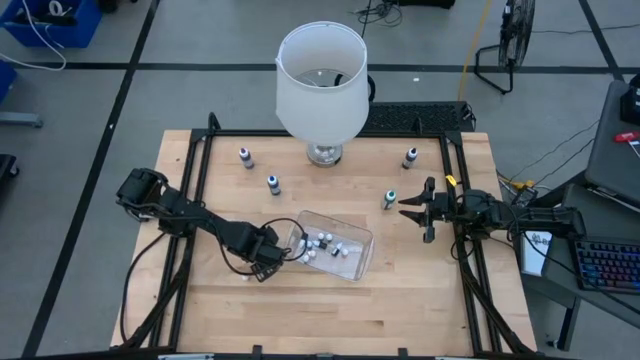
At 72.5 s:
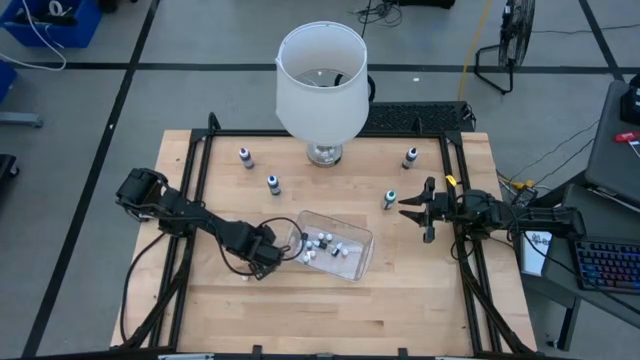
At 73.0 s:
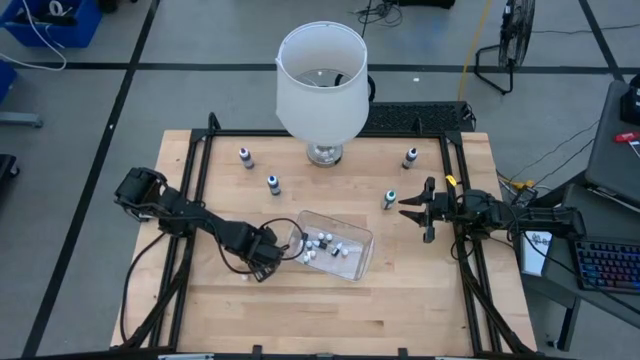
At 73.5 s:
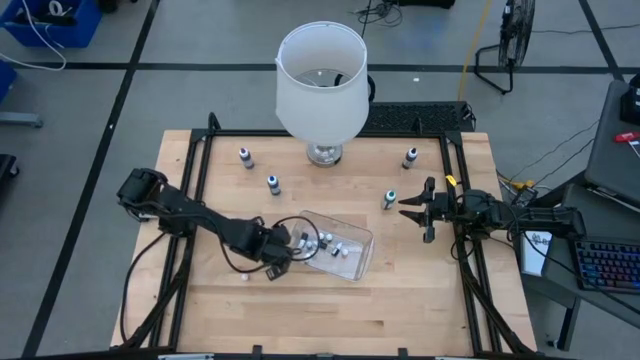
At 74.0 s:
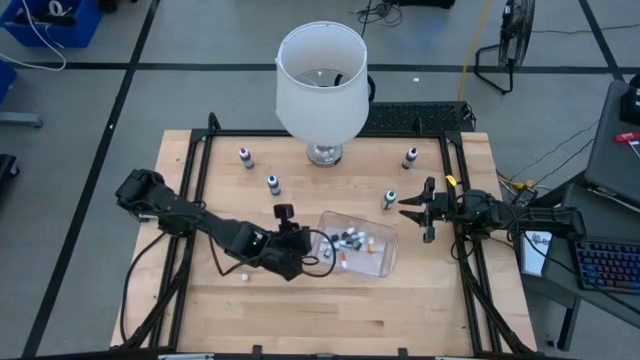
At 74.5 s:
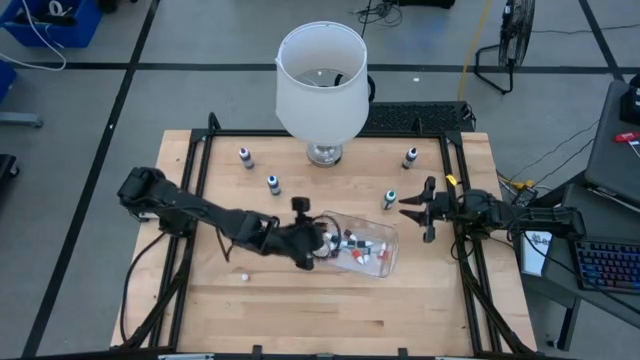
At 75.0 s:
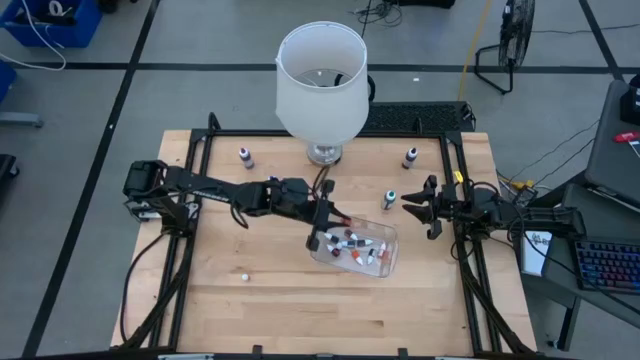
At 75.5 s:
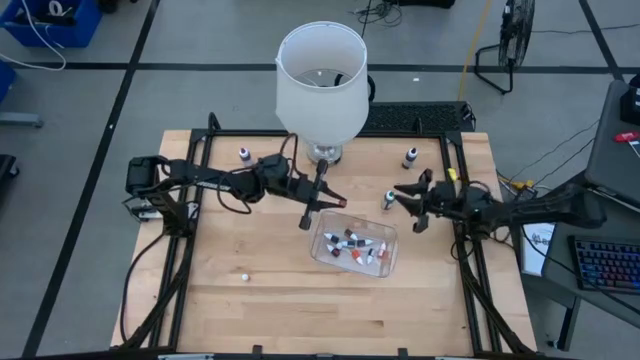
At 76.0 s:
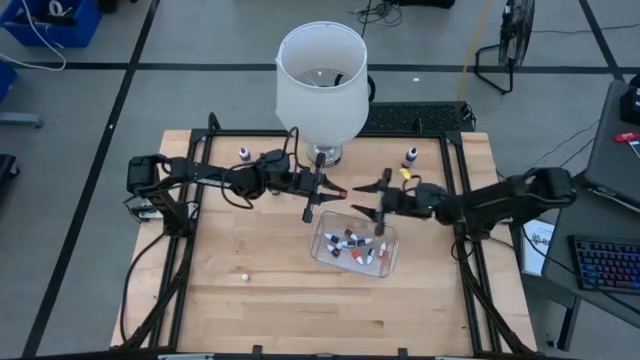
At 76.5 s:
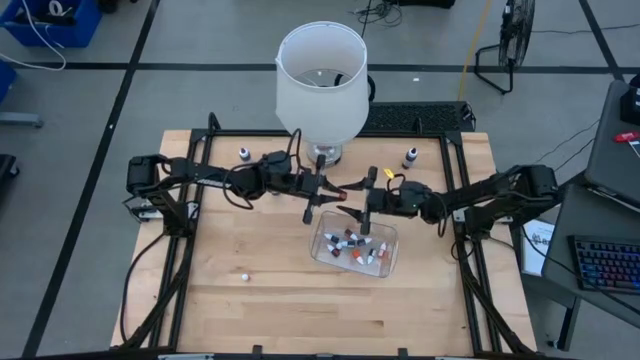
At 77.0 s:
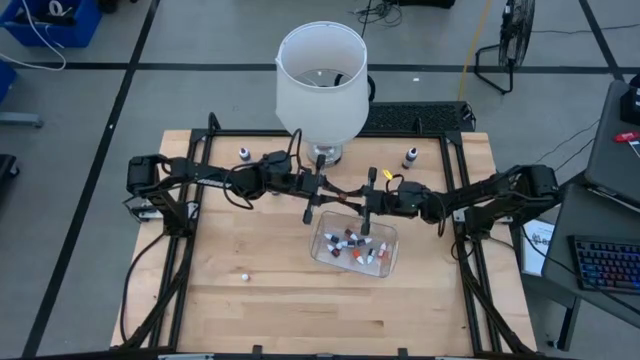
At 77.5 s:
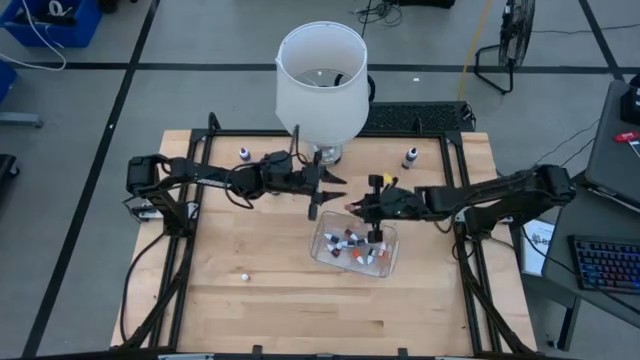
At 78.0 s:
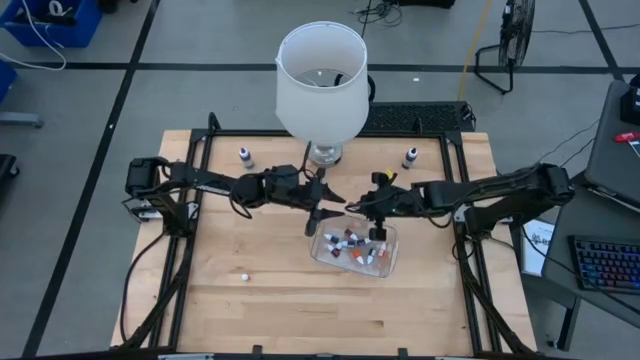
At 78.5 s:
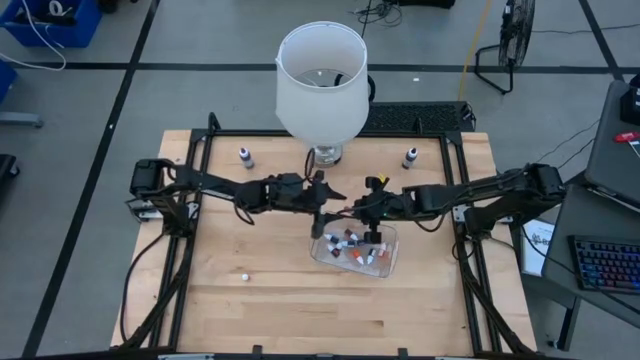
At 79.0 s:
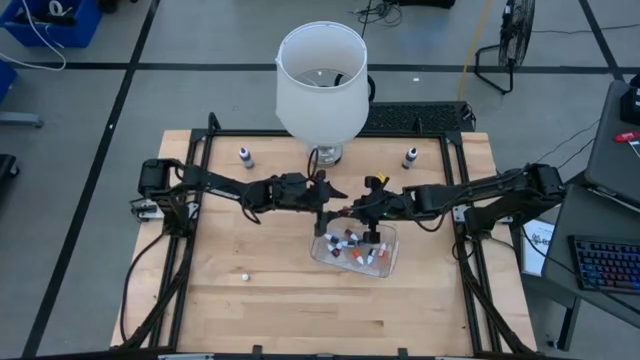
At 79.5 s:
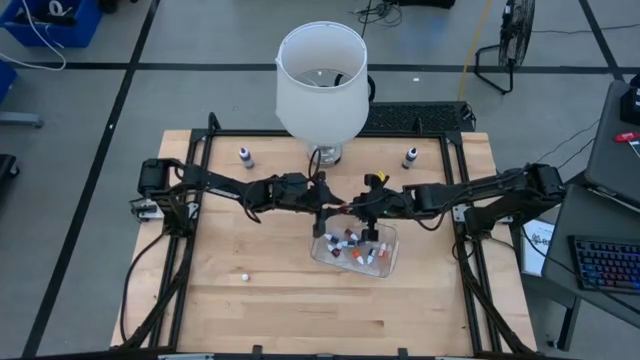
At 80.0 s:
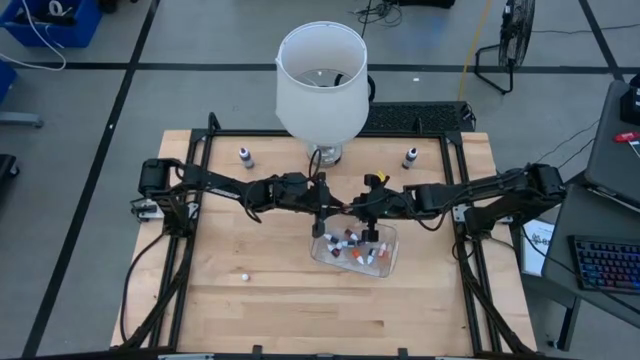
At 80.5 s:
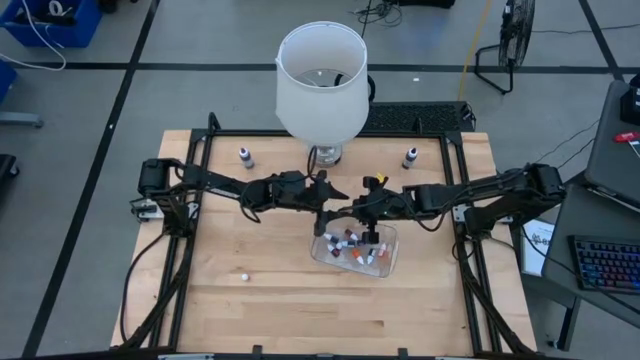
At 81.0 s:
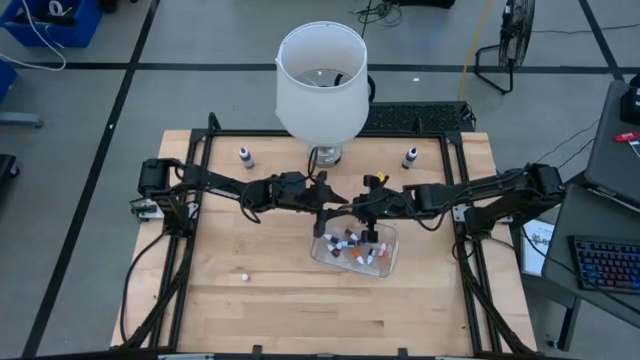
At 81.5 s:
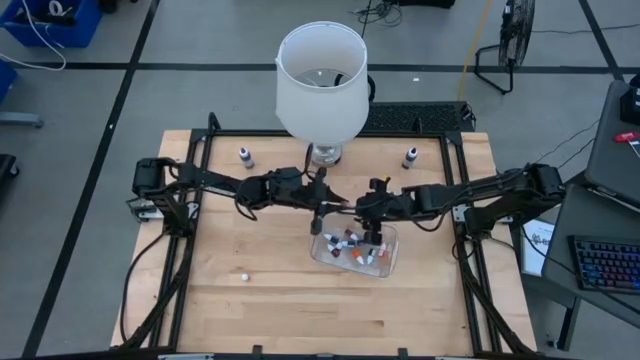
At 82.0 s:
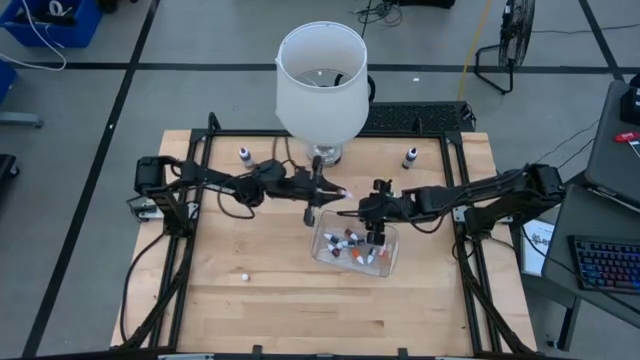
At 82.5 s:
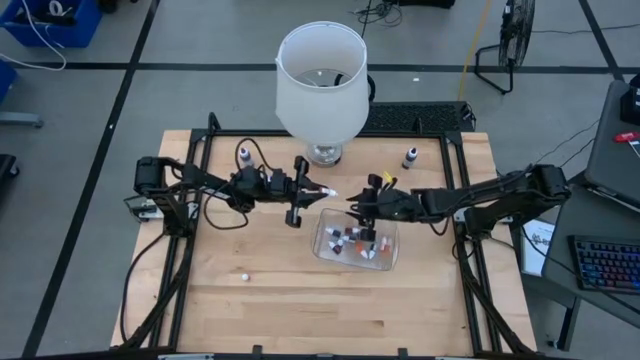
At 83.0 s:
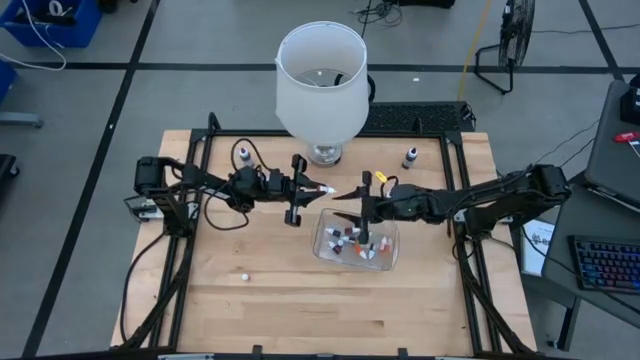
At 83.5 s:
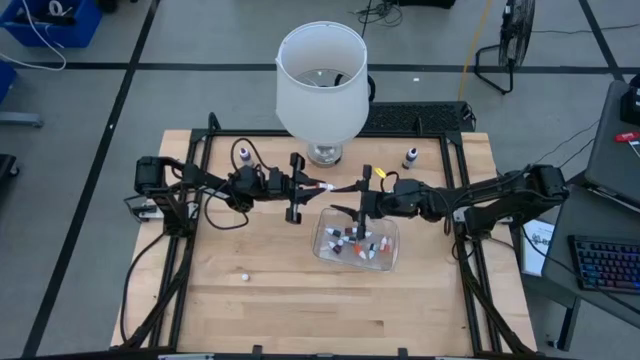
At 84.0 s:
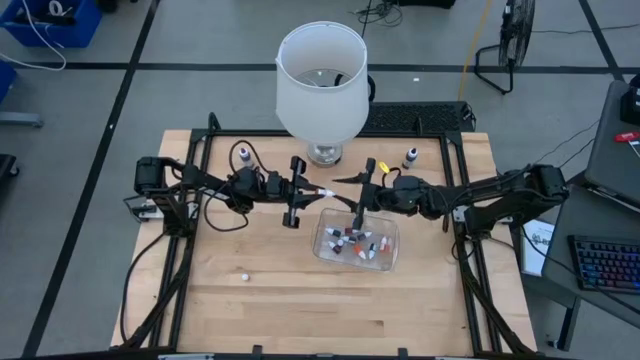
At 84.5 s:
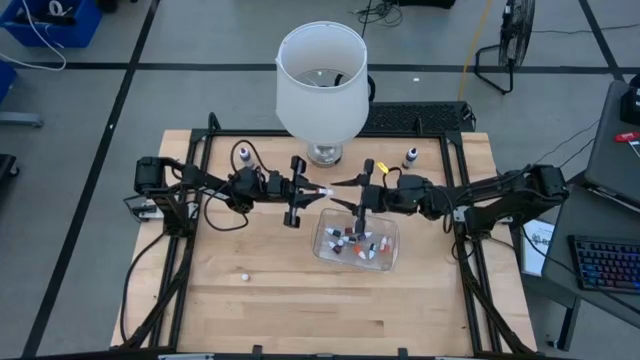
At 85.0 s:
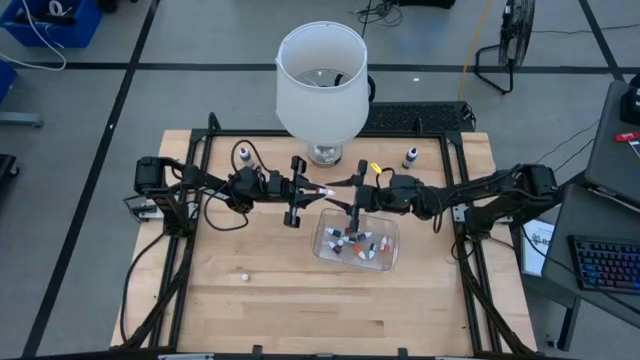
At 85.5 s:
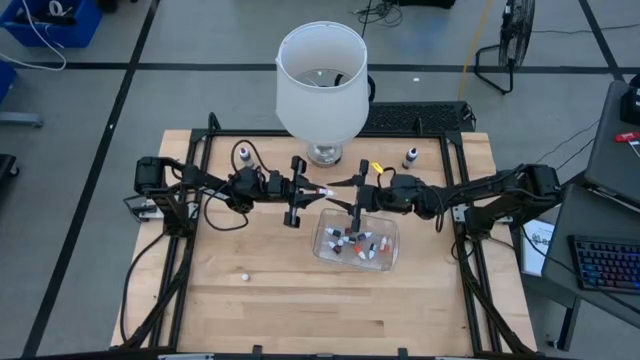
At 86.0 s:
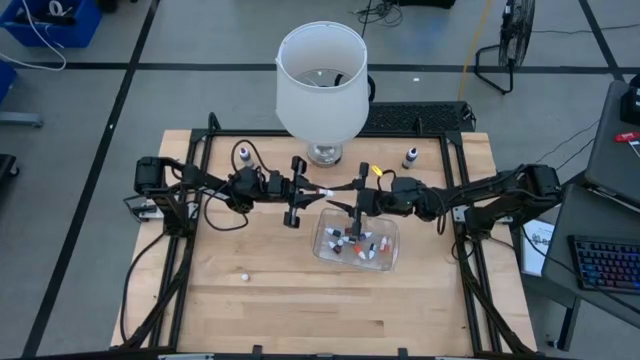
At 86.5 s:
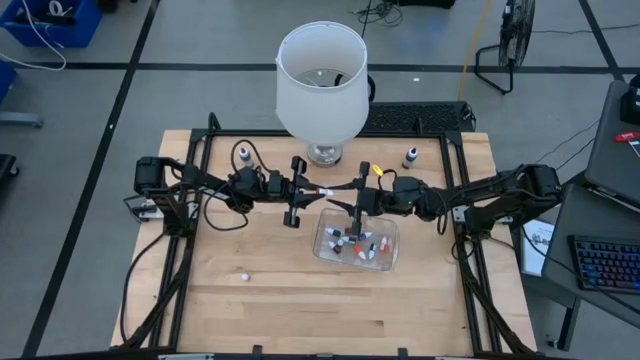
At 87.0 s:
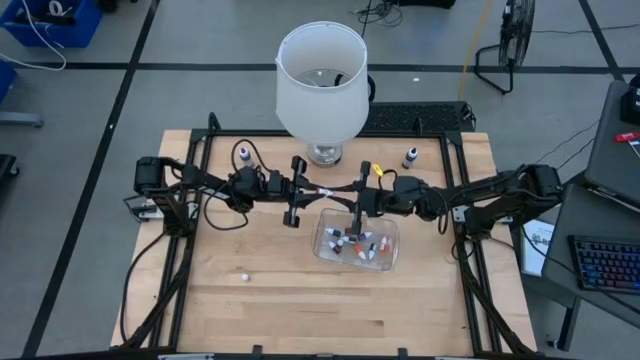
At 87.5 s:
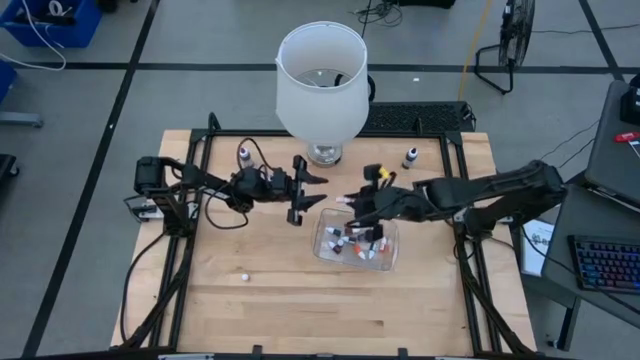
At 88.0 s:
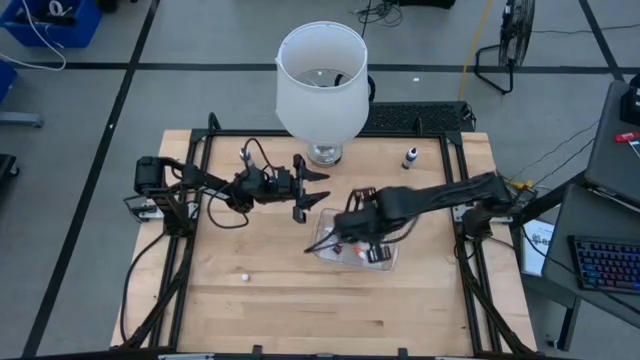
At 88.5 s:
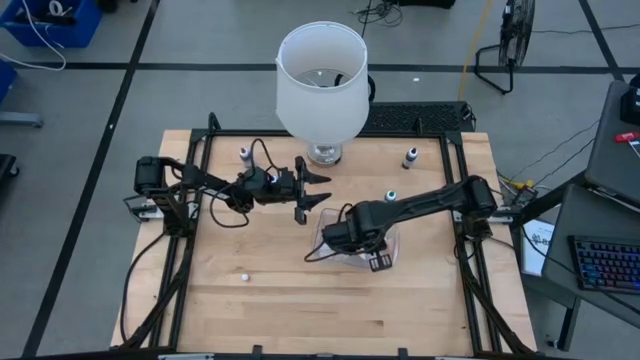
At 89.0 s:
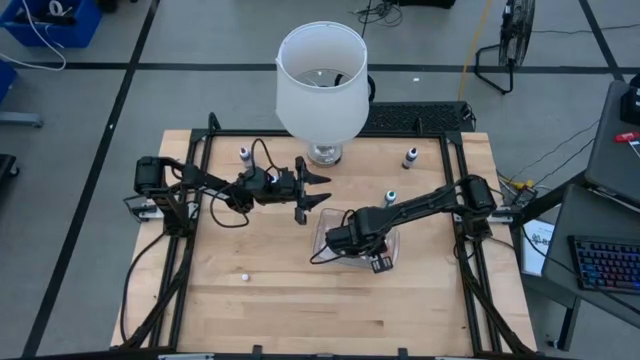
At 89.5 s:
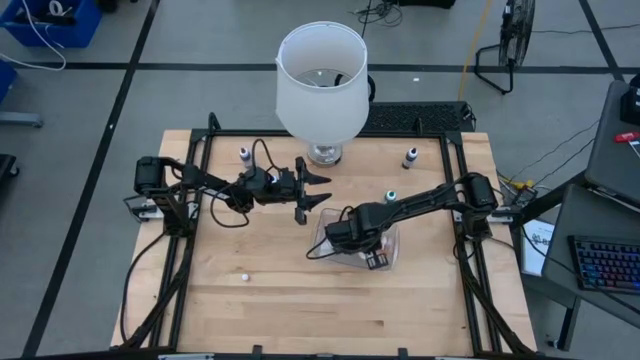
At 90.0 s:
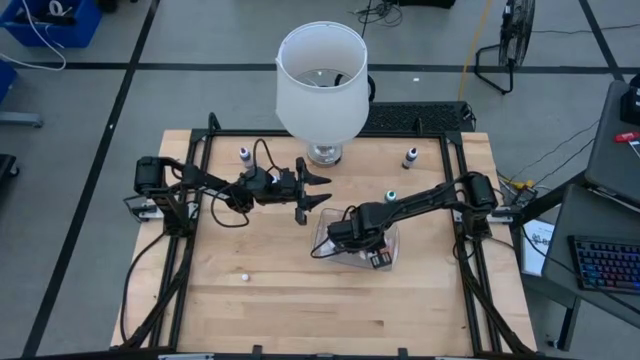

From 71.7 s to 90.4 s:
Task: Pick & Place food coloring
Put the yellow food coloring bottle into the transparent bin

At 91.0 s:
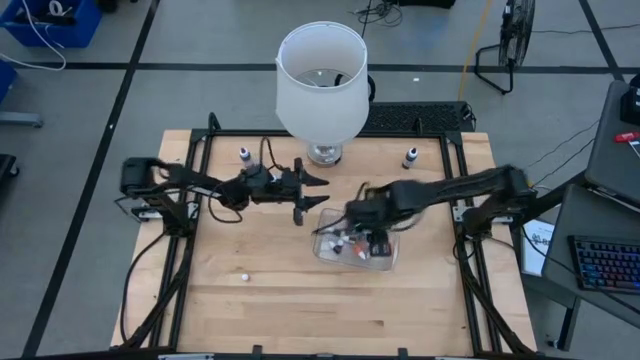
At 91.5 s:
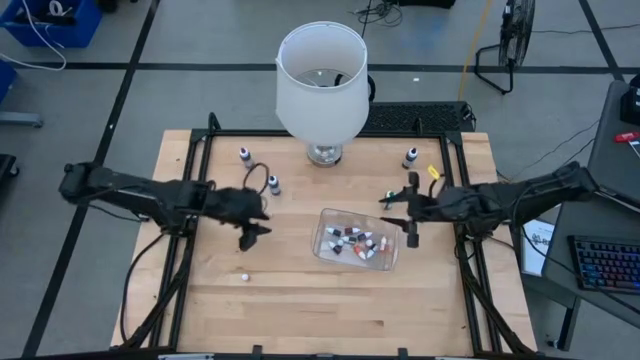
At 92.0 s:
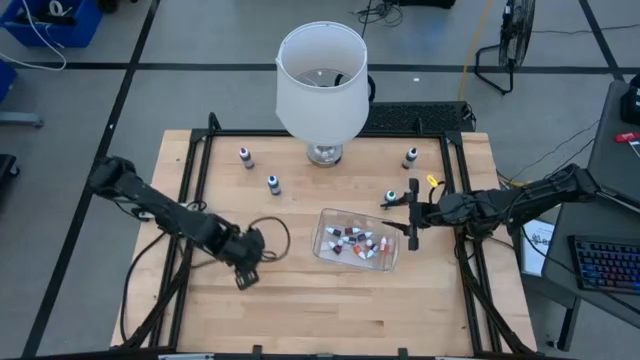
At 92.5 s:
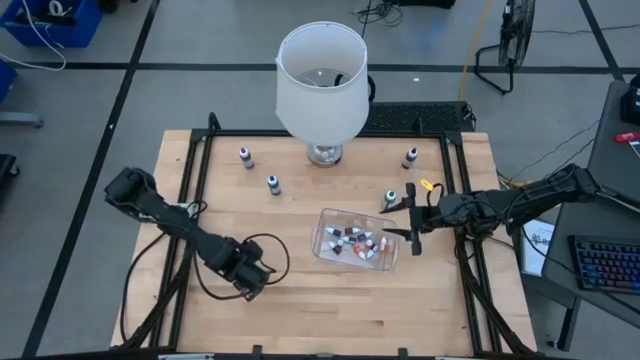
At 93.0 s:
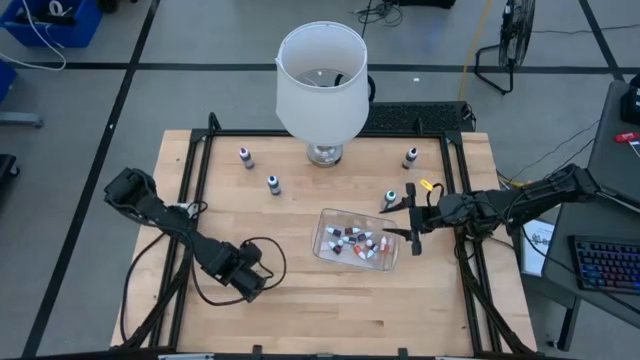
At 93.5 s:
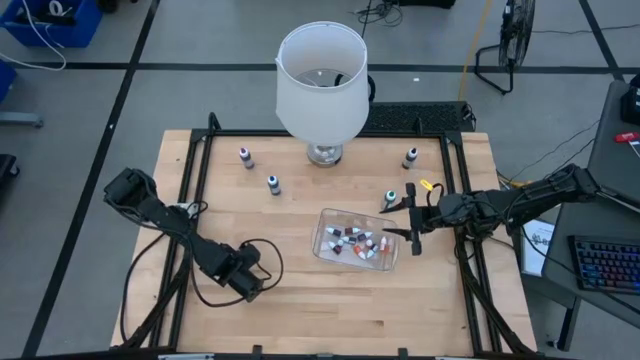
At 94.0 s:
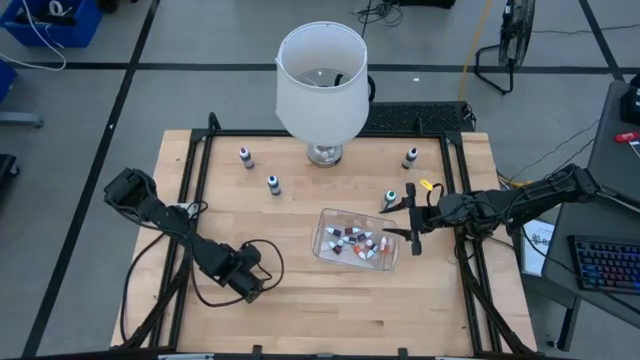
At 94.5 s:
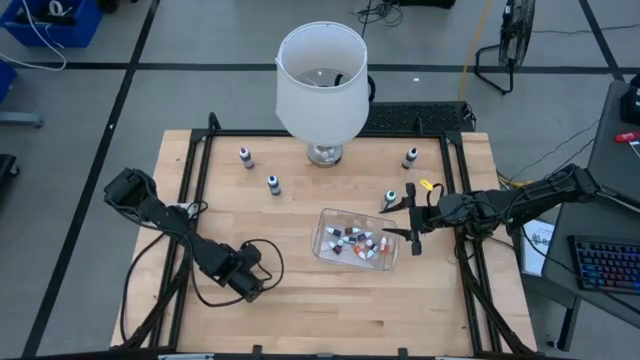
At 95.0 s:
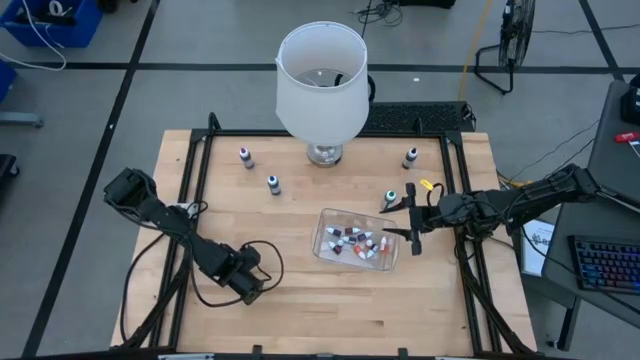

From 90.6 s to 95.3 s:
Put the yellow food coloring bottle into the transparent bin
